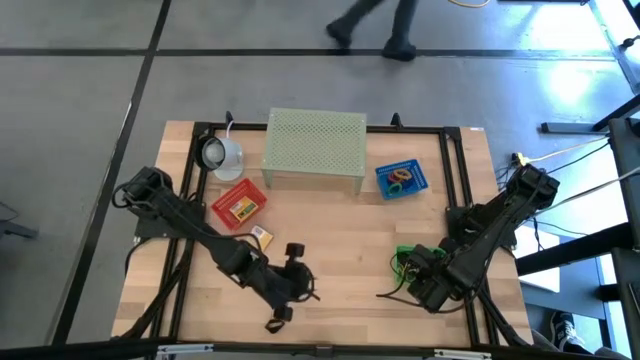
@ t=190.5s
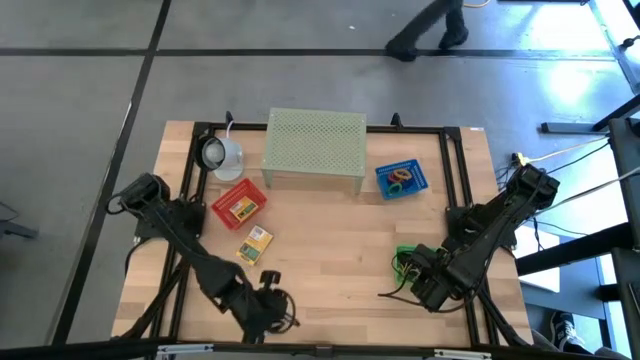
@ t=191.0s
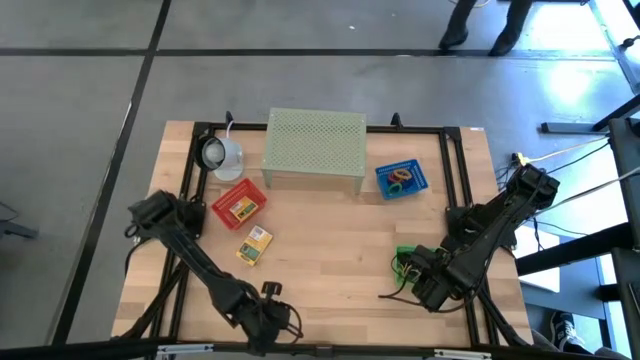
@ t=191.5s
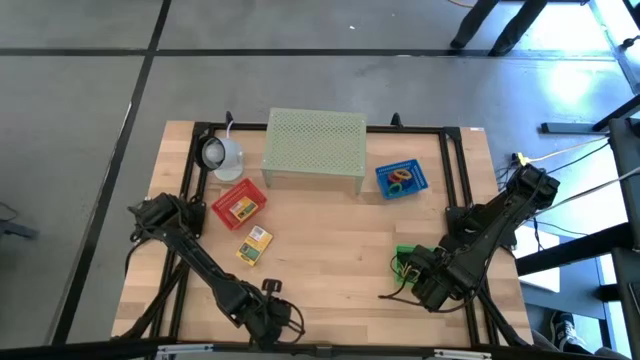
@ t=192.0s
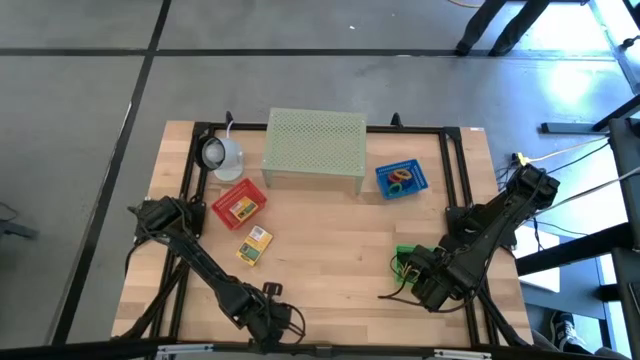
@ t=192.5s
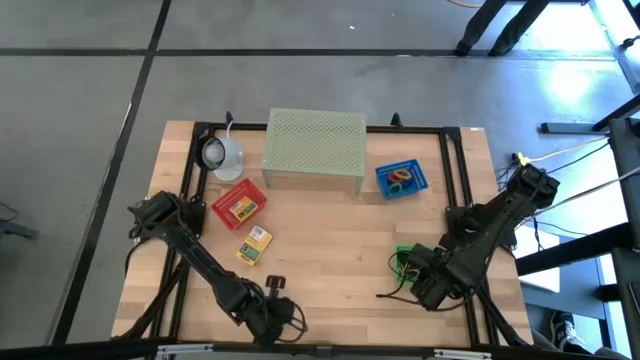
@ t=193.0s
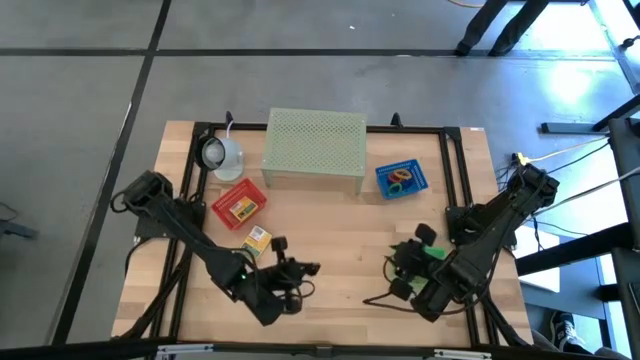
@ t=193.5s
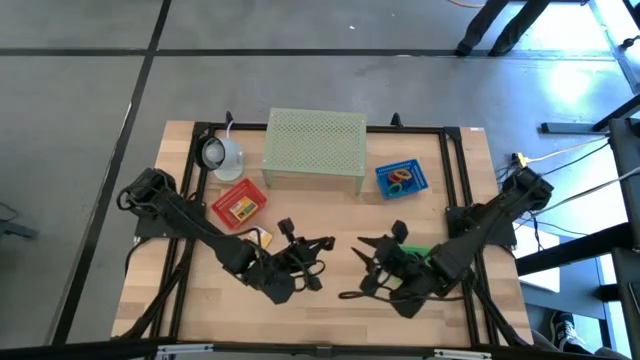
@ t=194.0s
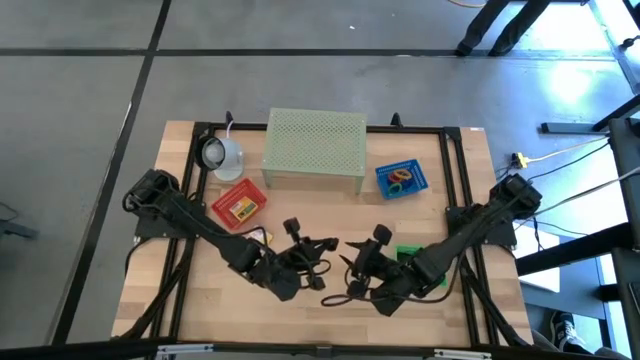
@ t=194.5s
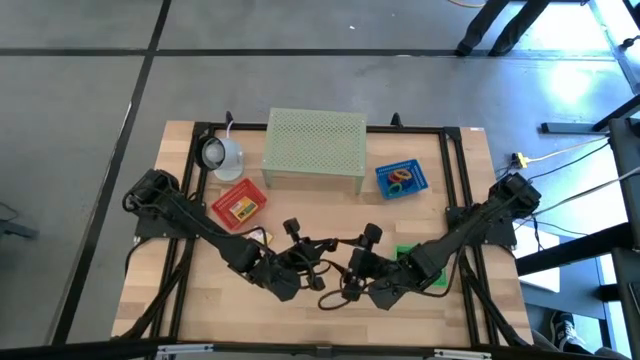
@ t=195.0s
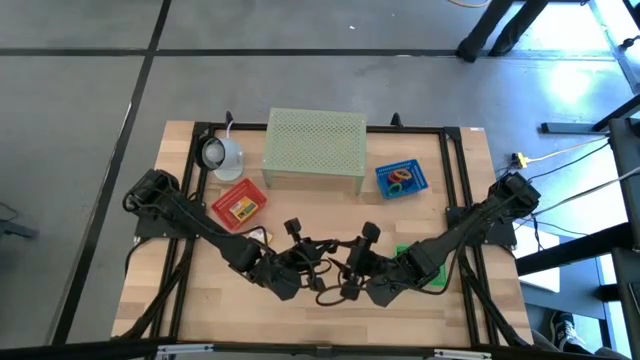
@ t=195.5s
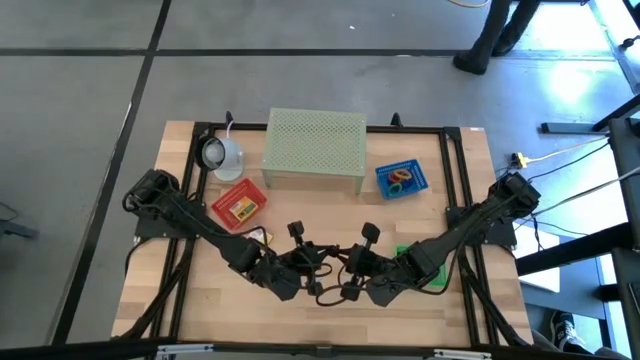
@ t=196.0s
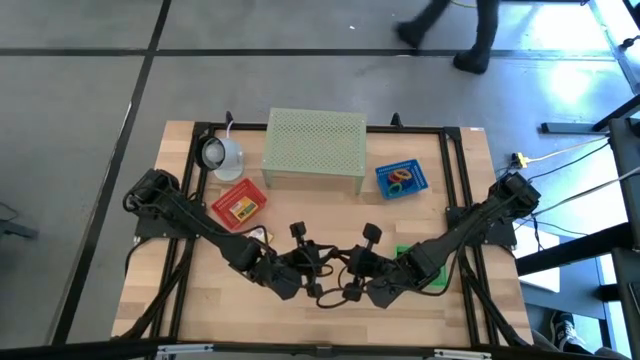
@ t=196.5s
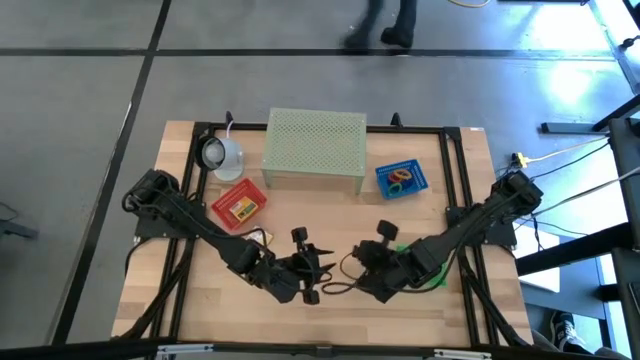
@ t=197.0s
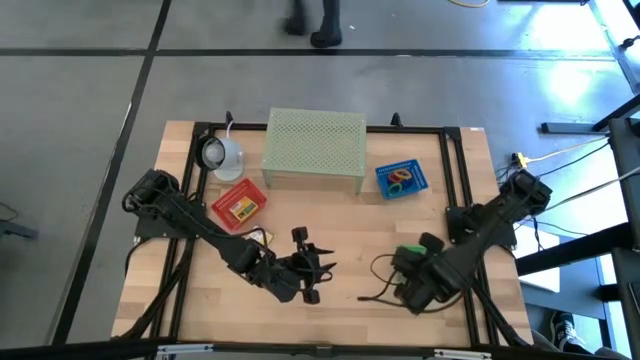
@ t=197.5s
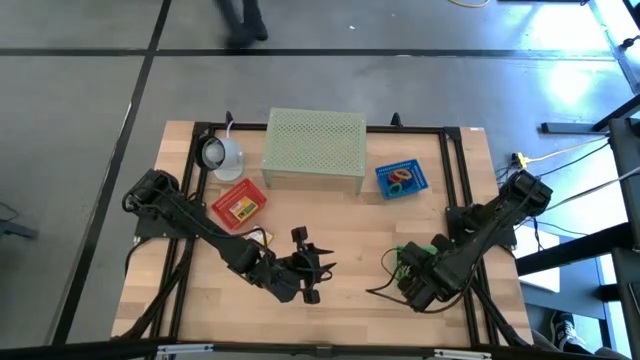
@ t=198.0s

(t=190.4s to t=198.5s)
Task: Pick & Place Office Desk Supplies
Put the black rubber band into the green bin

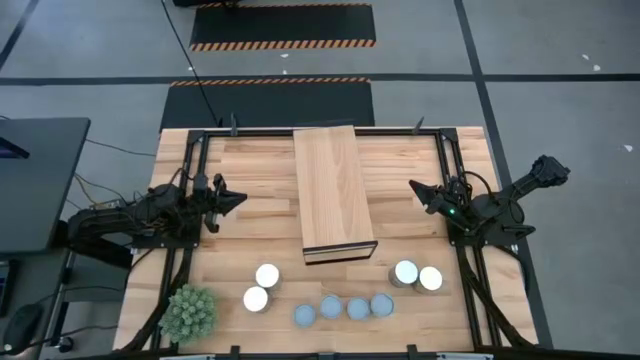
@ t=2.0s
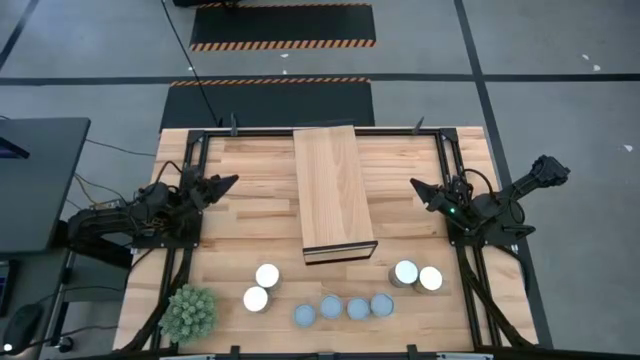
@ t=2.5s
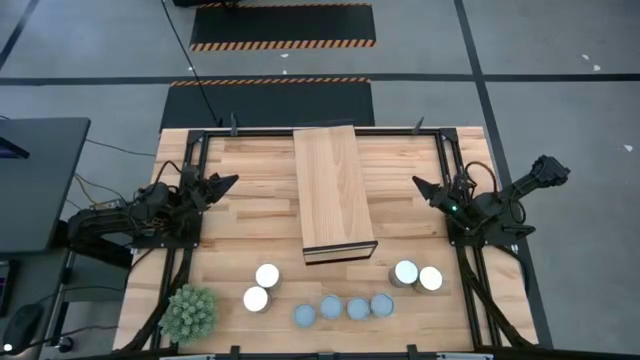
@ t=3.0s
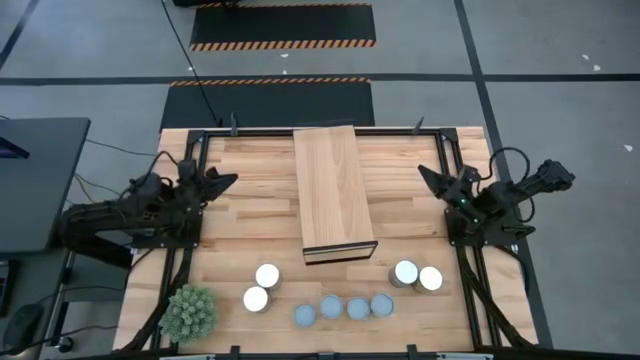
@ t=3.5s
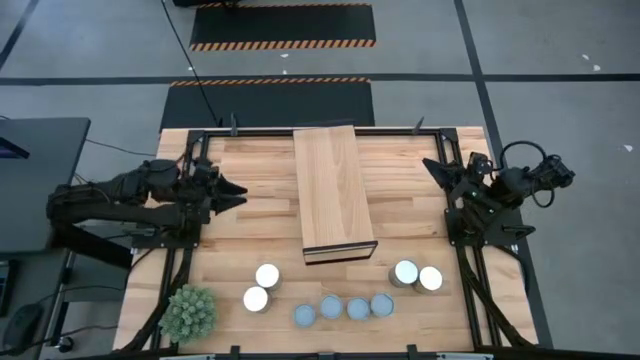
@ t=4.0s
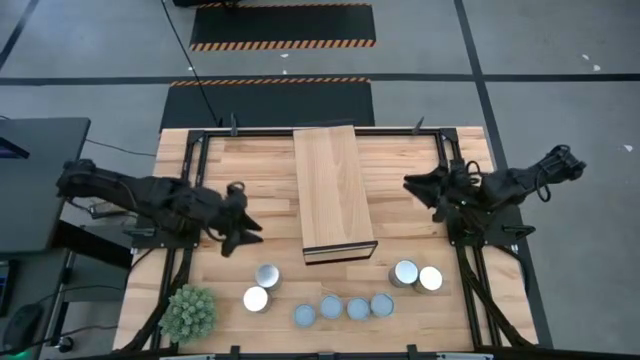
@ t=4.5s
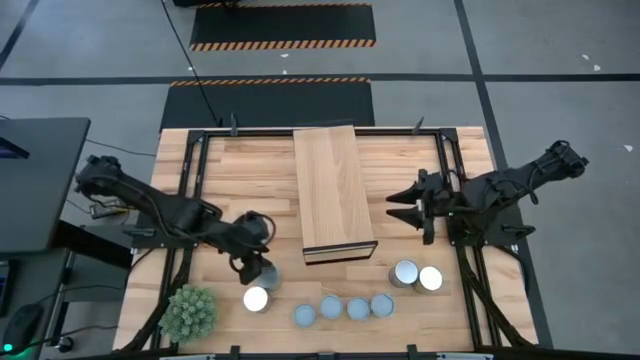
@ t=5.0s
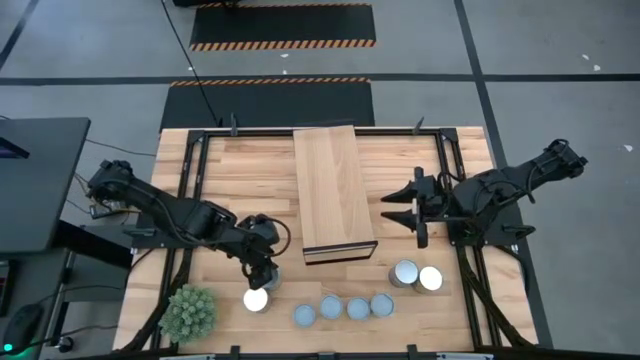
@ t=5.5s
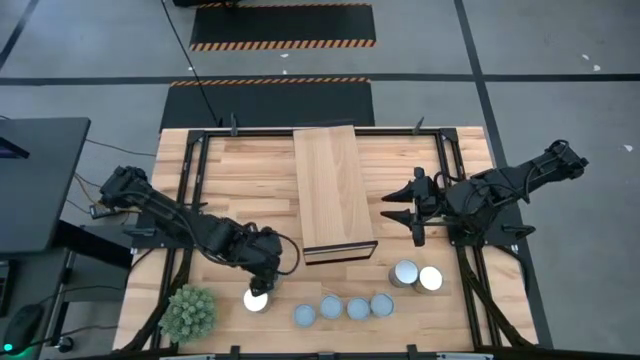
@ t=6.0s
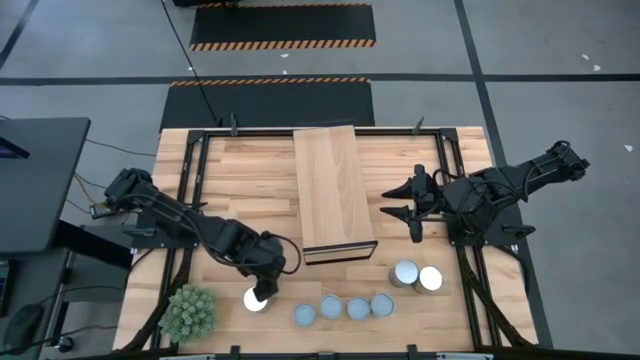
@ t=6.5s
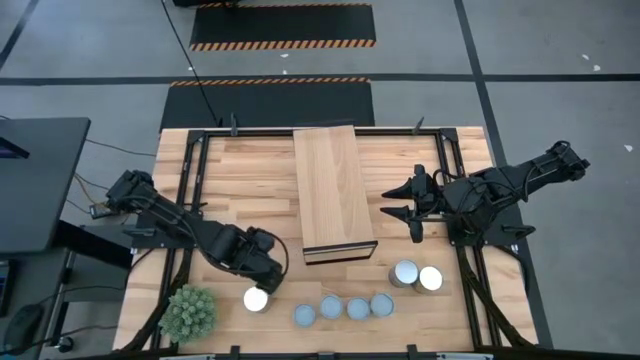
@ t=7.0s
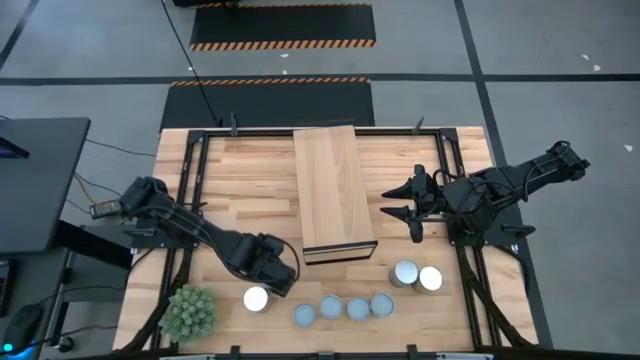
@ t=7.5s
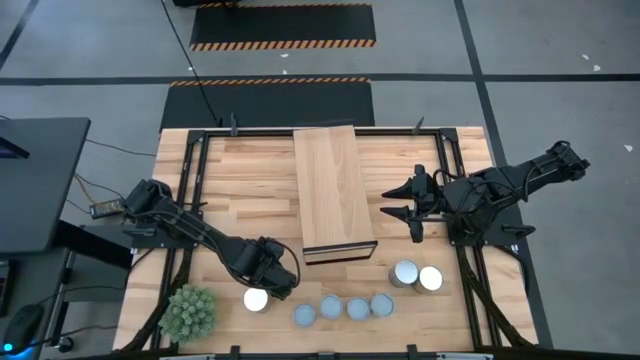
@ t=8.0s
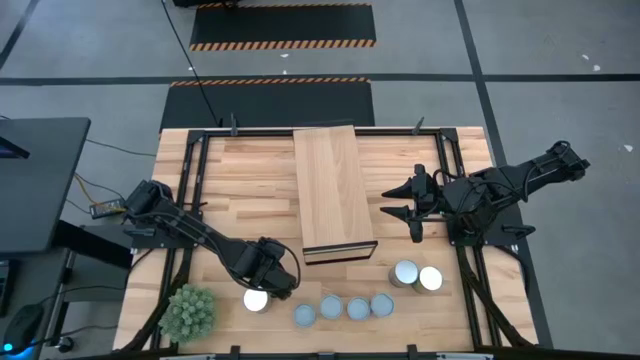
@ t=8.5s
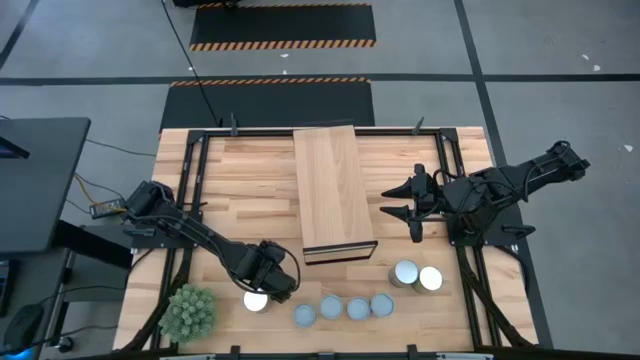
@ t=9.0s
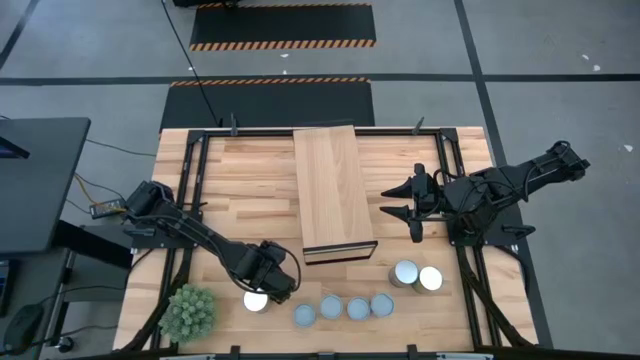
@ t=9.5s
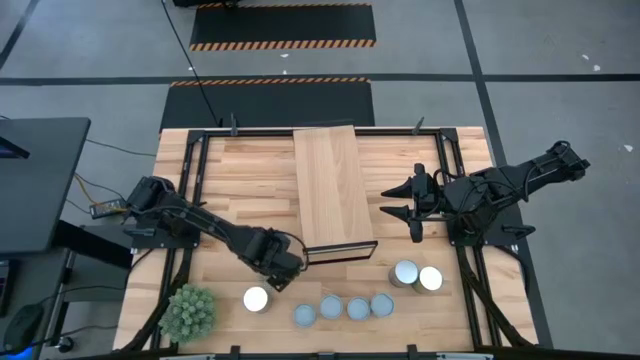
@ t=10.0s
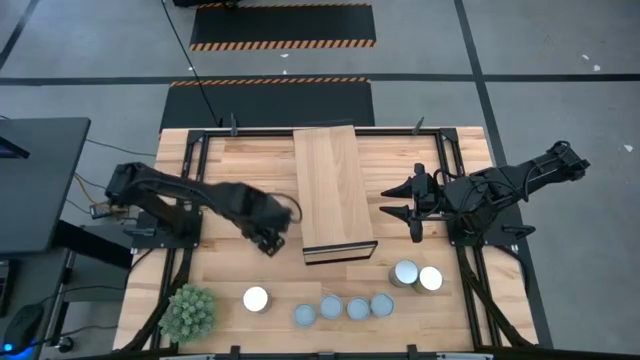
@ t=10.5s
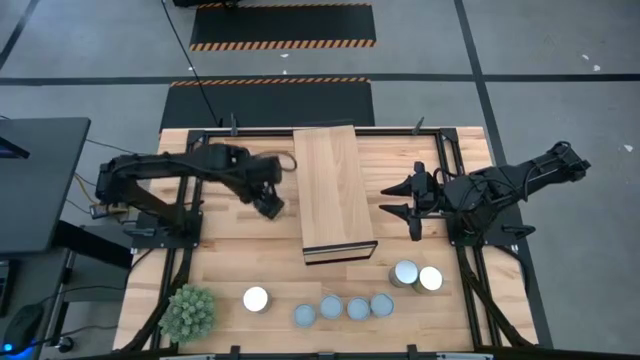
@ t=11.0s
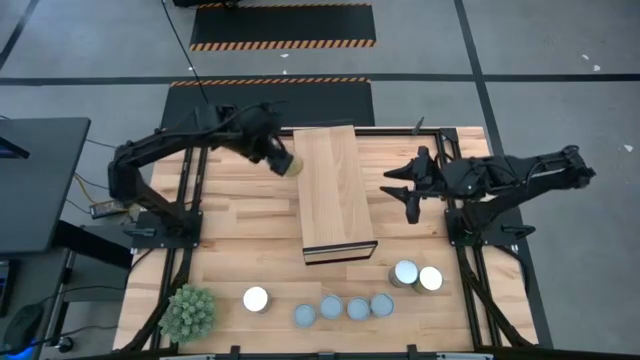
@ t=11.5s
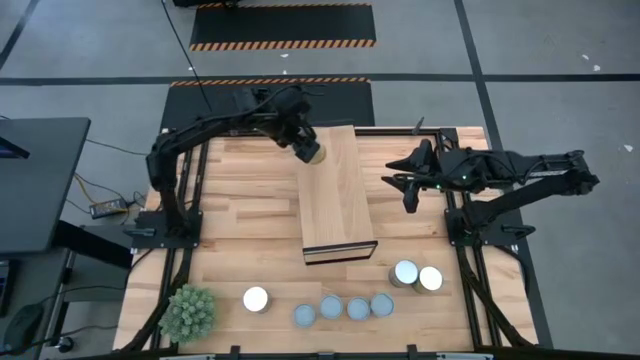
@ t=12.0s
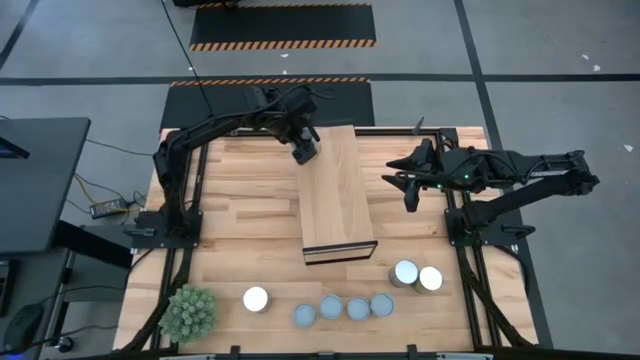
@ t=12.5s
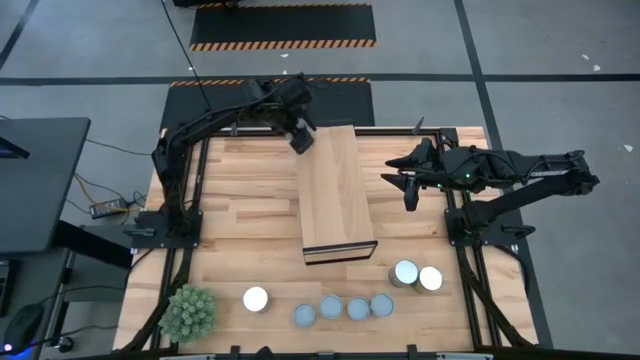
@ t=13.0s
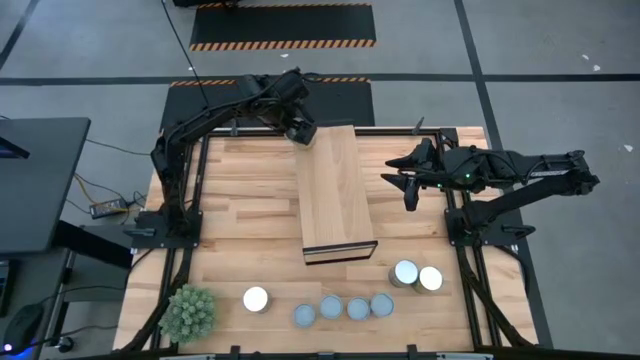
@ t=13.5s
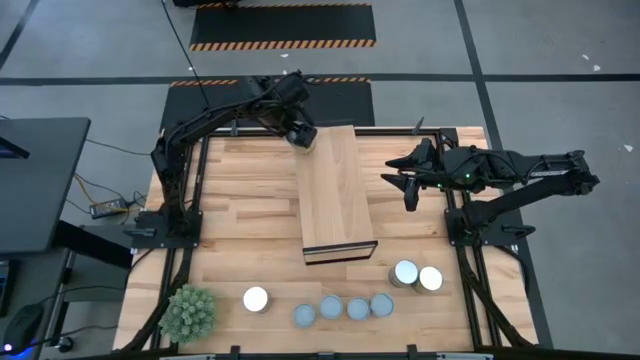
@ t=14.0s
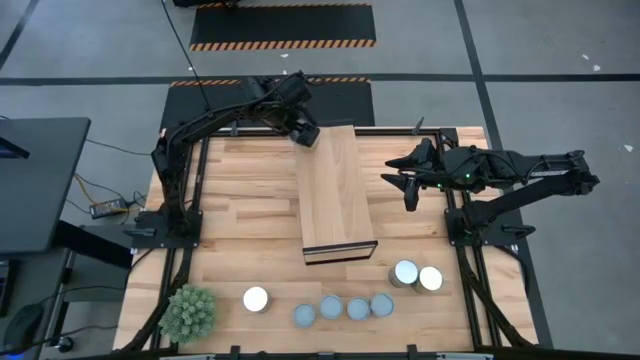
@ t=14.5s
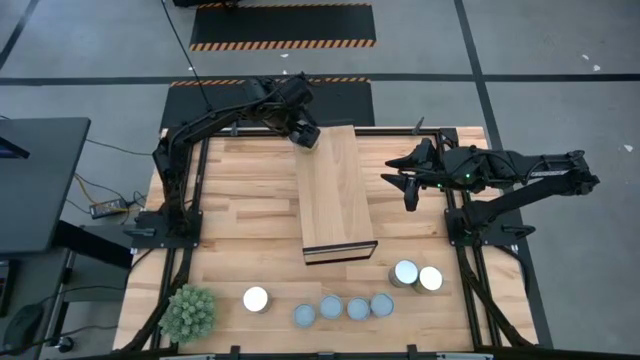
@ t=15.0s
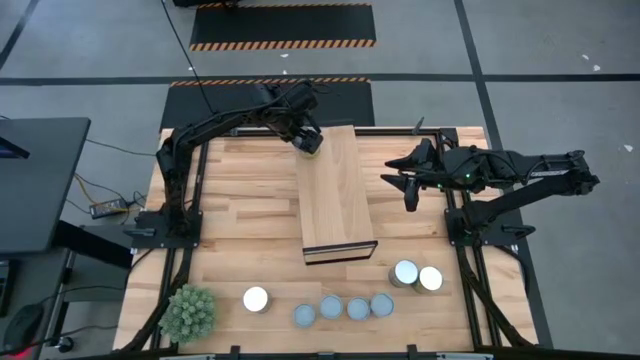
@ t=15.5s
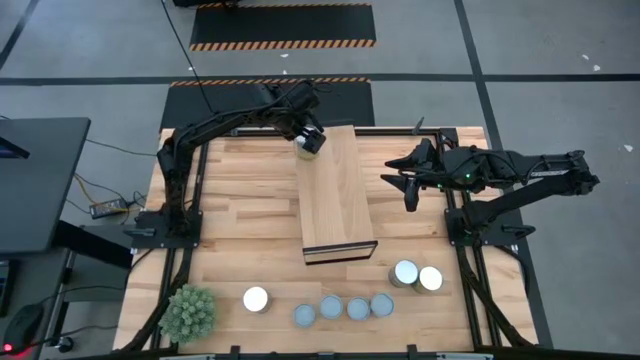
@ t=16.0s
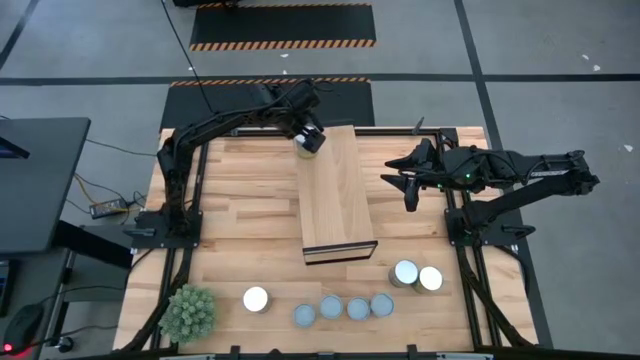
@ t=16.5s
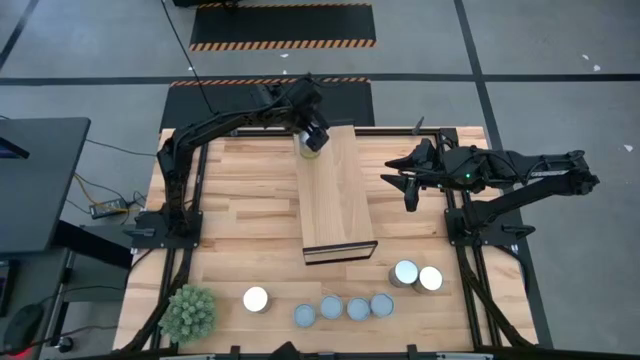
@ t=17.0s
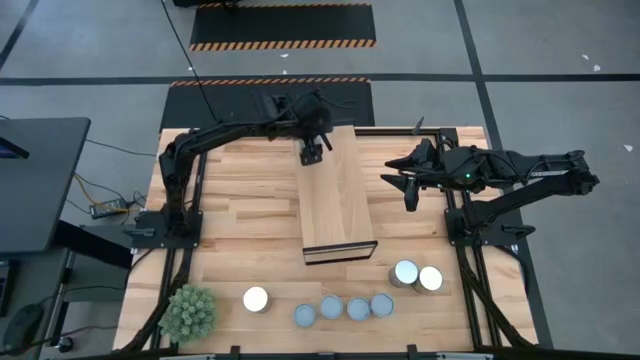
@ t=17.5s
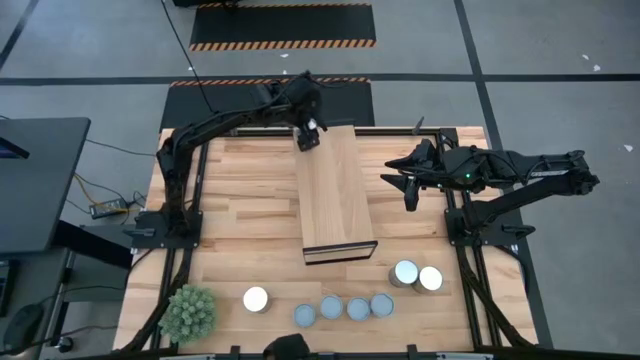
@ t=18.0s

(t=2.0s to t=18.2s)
Task: Pick and place cans onto a shelf
Put the canned carrots on the shelf
